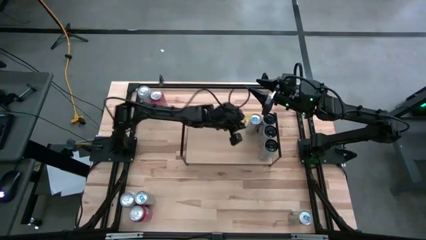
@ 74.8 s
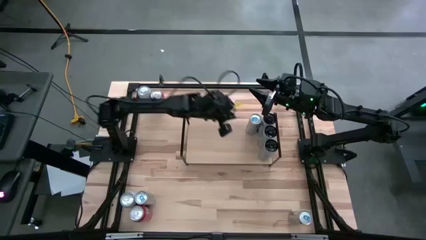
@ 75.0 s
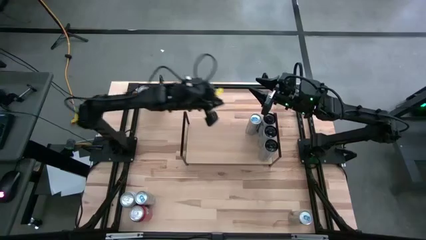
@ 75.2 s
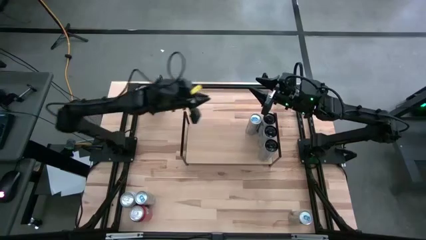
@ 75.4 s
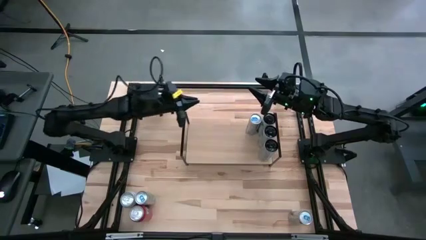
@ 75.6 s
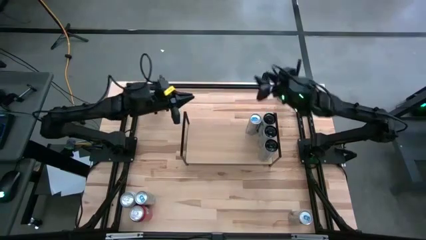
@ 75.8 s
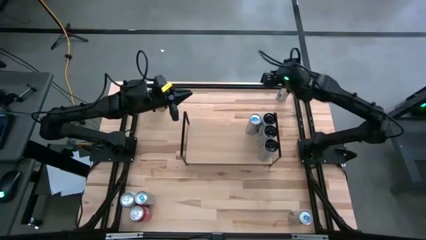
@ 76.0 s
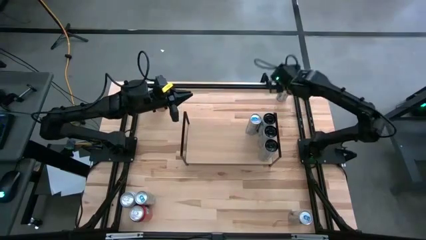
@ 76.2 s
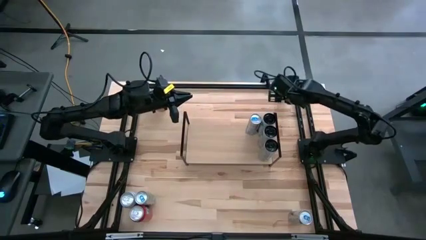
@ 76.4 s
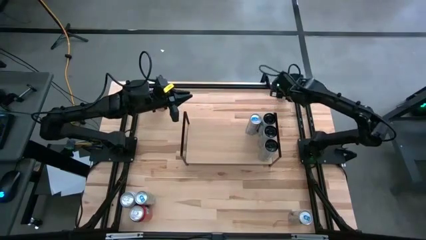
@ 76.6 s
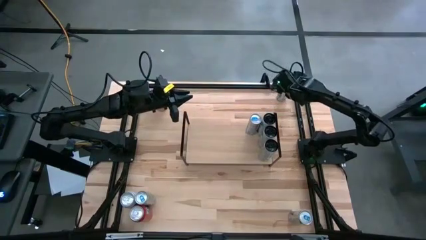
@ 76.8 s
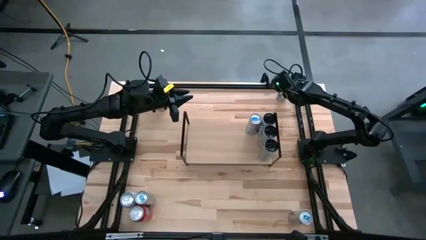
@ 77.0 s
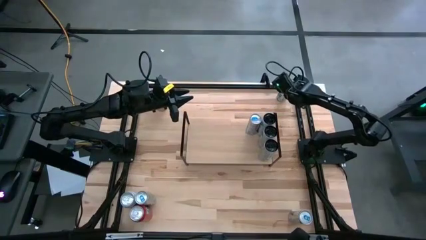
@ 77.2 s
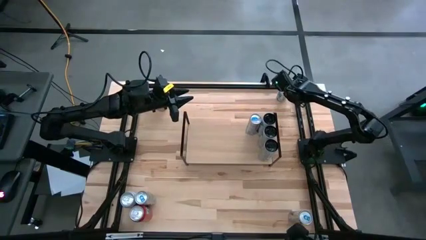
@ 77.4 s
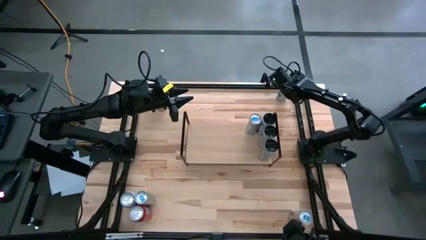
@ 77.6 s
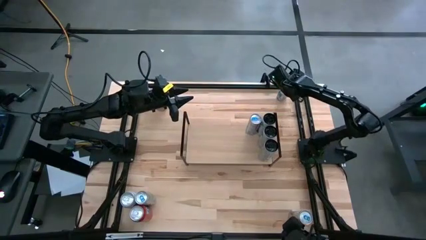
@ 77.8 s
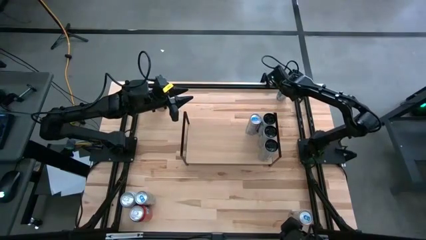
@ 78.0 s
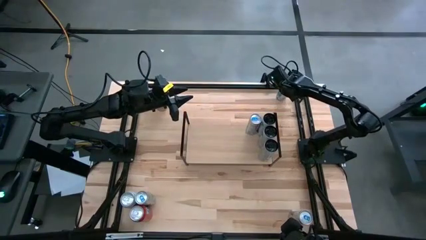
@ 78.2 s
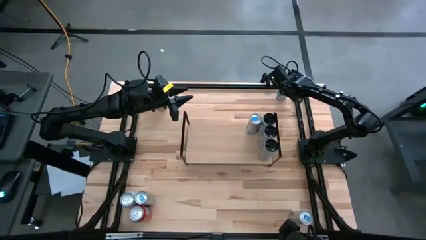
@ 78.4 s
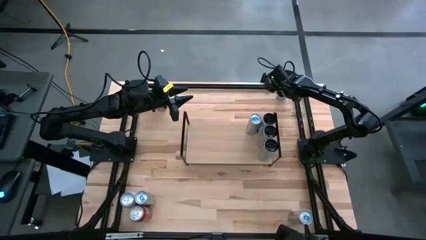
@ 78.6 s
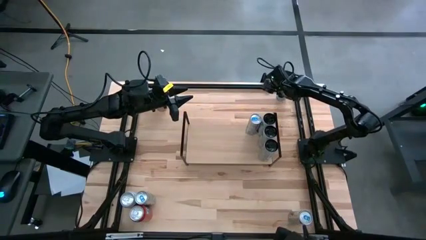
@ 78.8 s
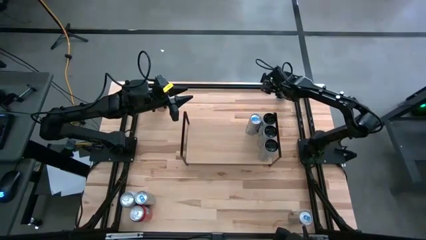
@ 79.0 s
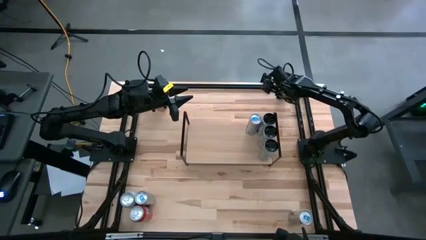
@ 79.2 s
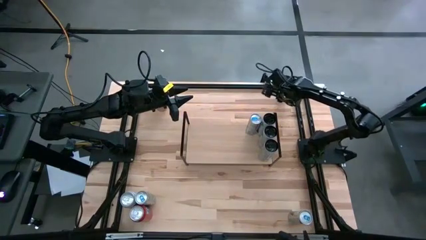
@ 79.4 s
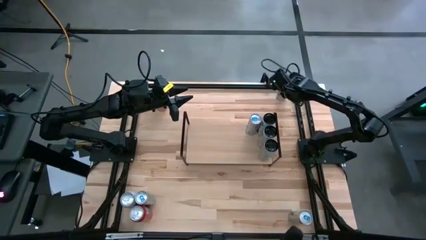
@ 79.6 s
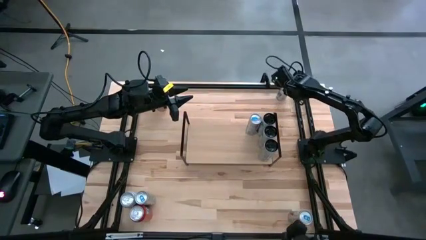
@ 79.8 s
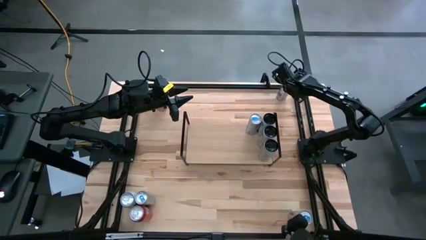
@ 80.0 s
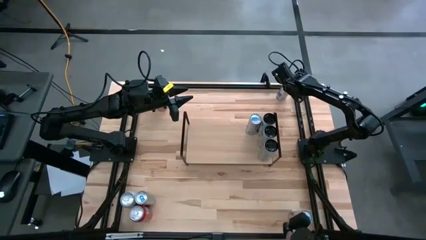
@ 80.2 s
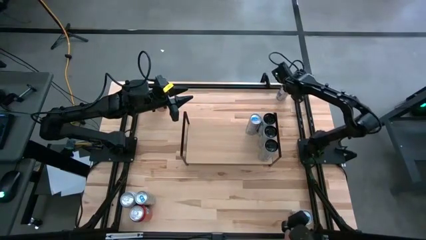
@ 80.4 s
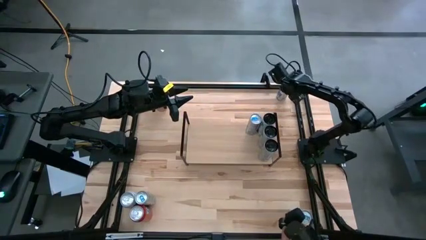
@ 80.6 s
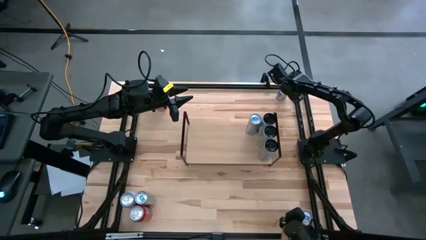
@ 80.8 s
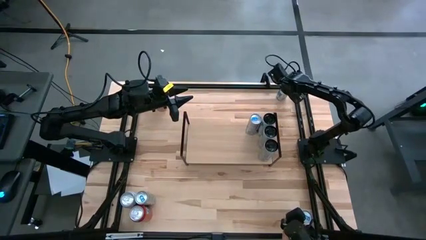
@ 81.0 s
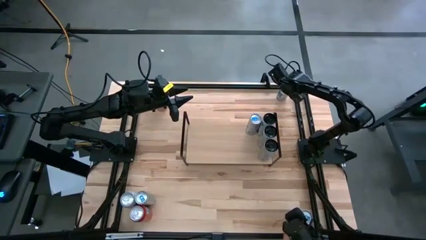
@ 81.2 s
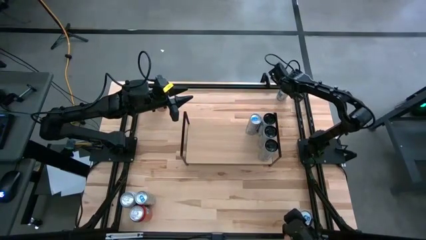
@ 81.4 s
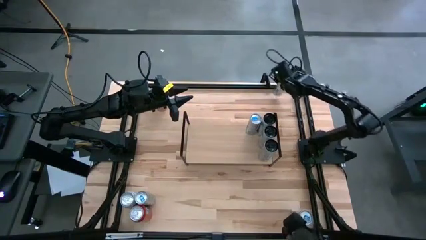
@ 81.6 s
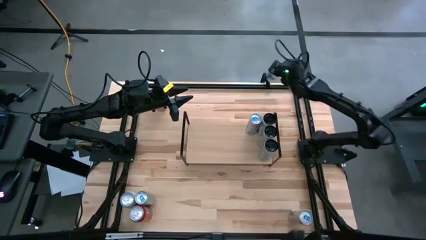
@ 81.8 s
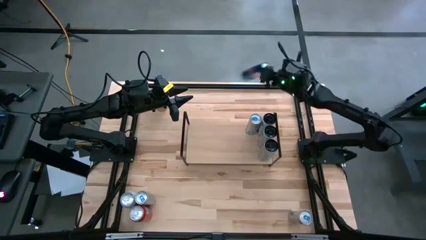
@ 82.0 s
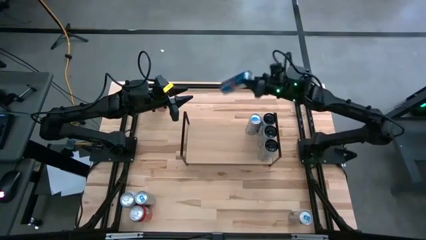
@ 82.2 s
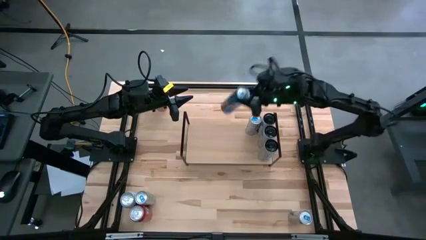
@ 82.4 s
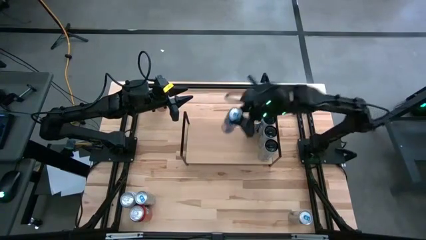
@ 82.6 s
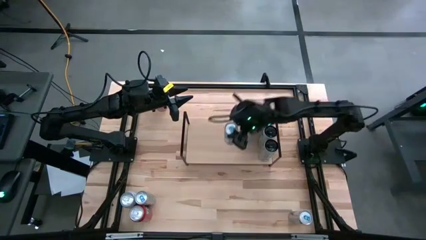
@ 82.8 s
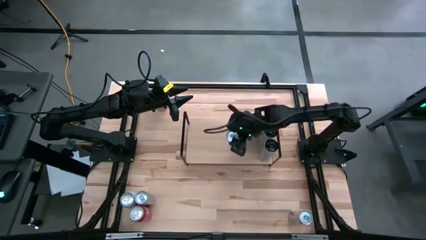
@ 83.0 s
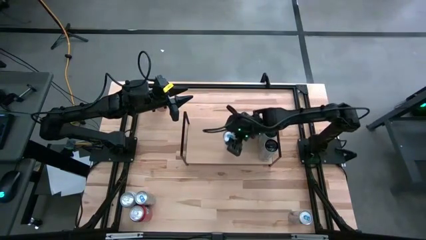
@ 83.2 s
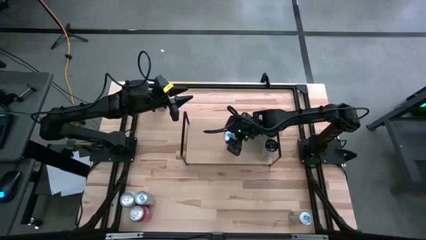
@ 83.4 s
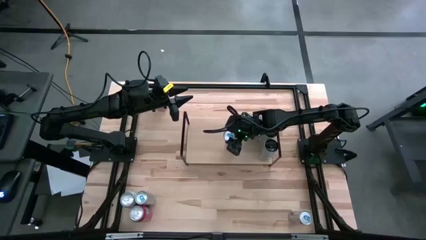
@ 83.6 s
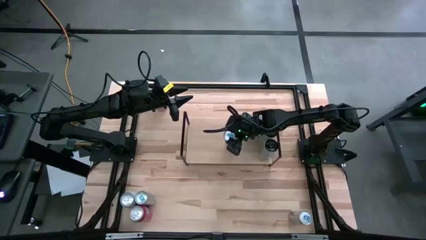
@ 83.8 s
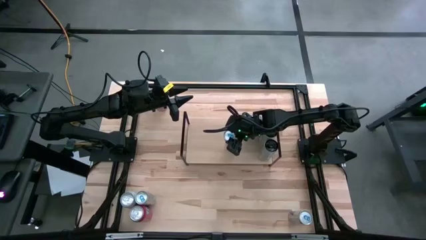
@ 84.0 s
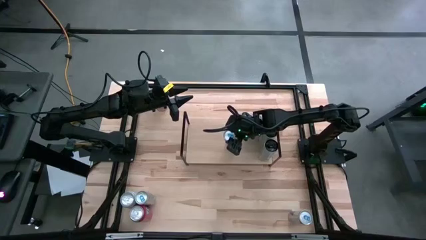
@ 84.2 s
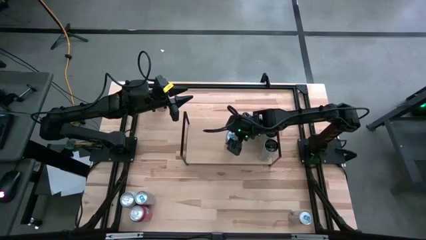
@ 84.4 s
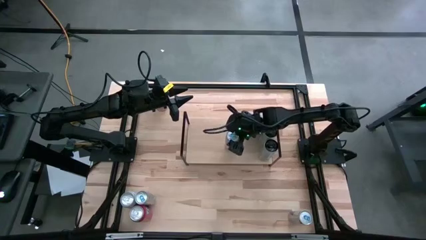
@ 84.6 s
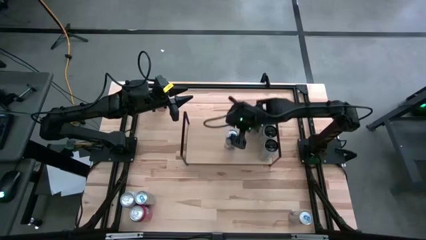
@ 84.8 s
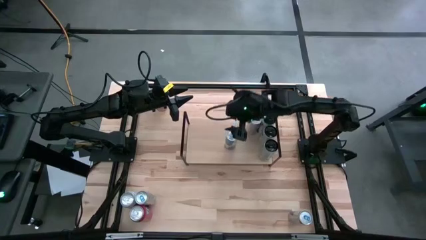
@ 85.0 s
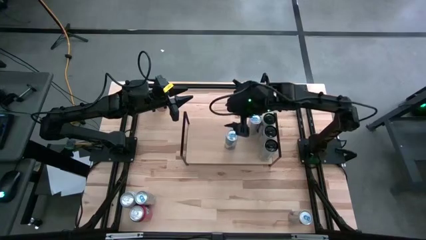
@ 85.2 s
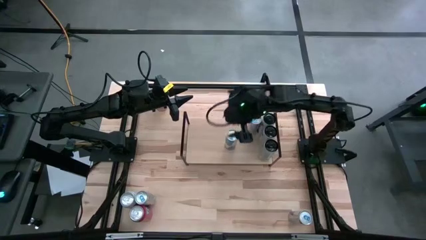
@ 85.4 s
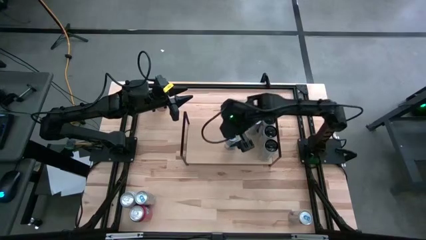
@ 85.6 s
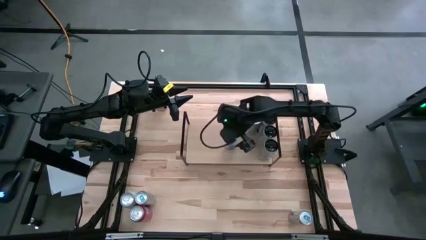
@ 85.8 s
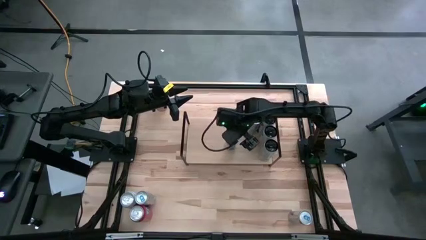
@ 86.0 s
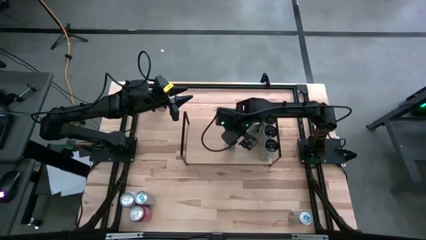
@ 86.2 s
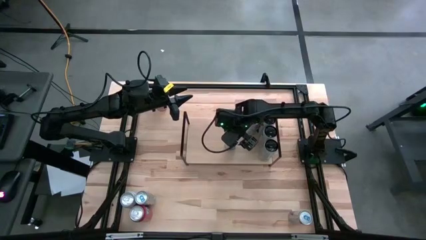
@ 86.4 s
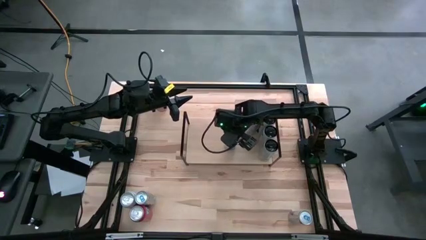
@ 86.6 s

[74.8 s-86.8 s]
Task: Place canned beverage on shelf
Put the blue soda can on the shelf aligned with the other blue soda can

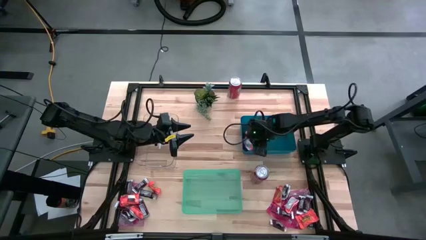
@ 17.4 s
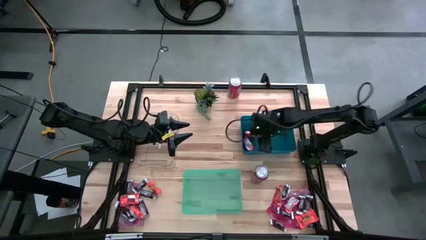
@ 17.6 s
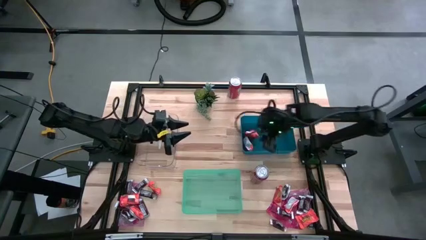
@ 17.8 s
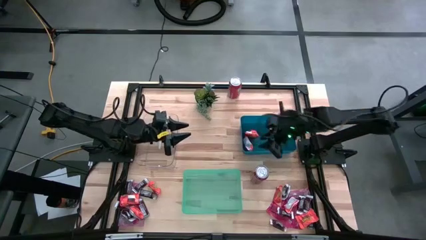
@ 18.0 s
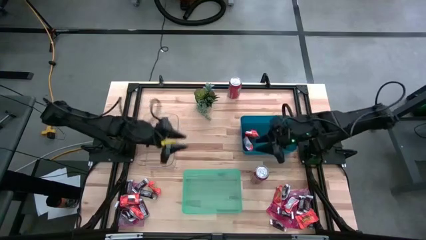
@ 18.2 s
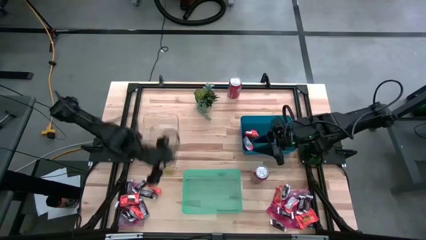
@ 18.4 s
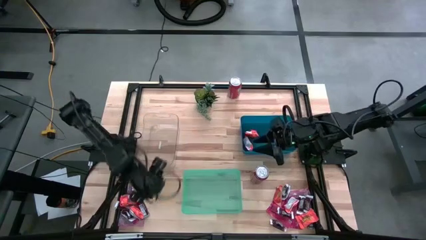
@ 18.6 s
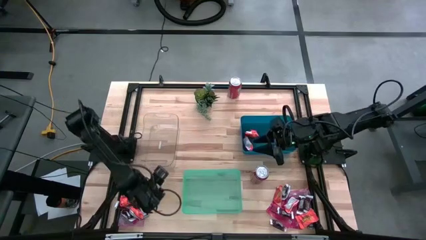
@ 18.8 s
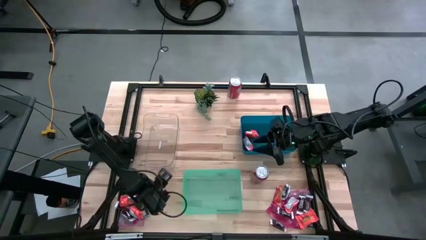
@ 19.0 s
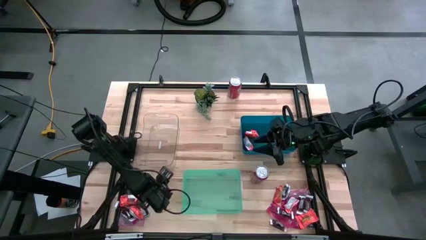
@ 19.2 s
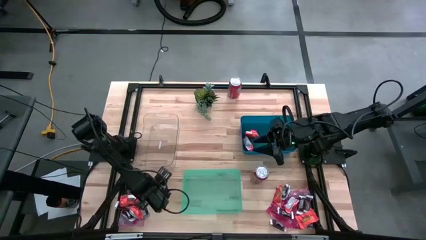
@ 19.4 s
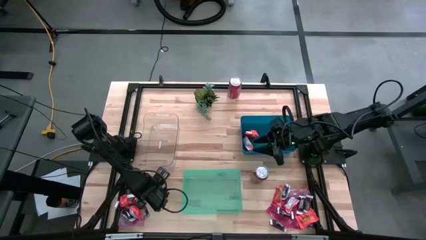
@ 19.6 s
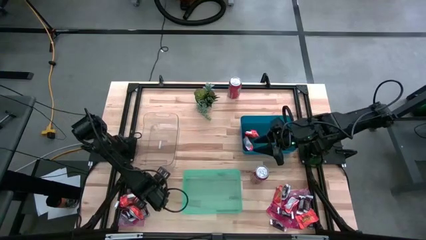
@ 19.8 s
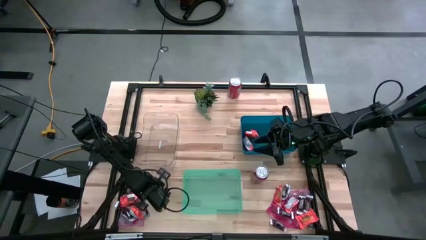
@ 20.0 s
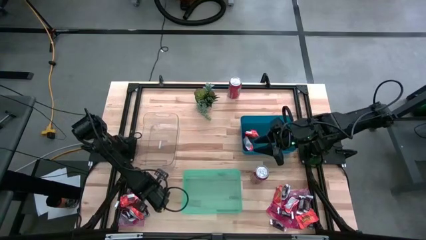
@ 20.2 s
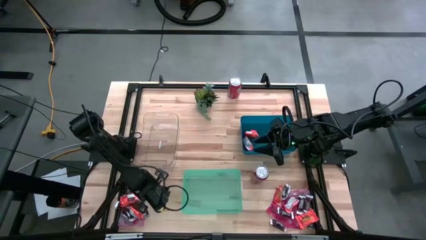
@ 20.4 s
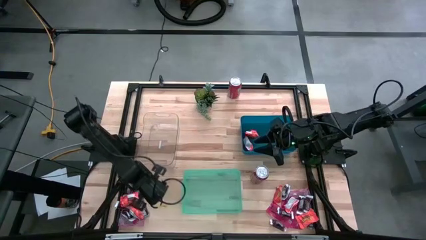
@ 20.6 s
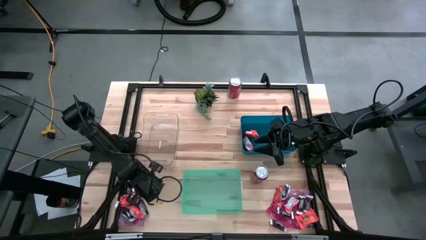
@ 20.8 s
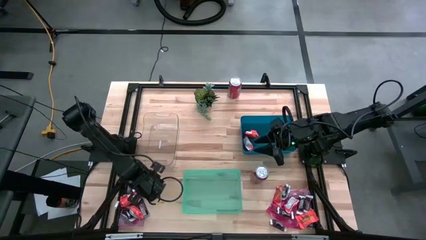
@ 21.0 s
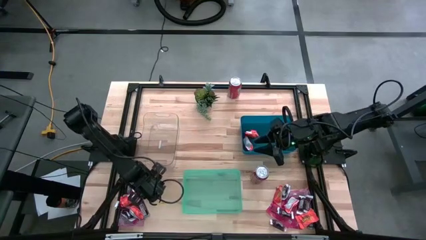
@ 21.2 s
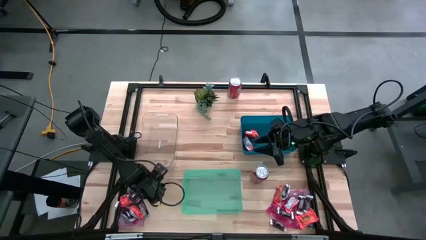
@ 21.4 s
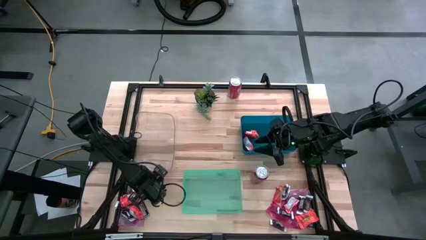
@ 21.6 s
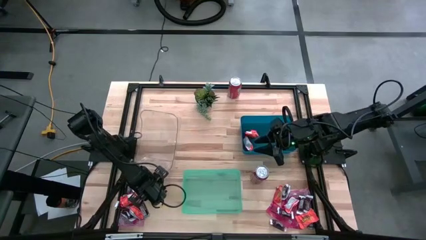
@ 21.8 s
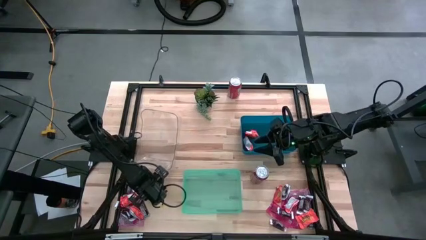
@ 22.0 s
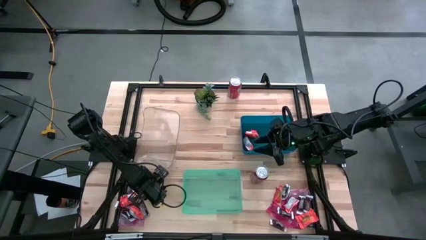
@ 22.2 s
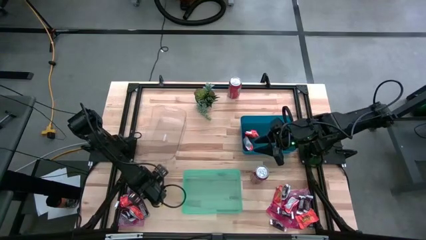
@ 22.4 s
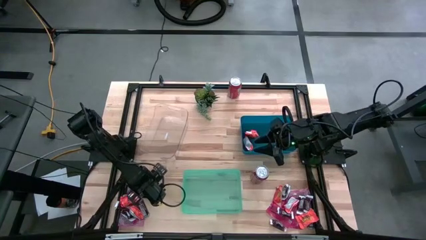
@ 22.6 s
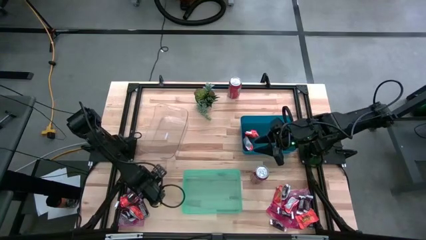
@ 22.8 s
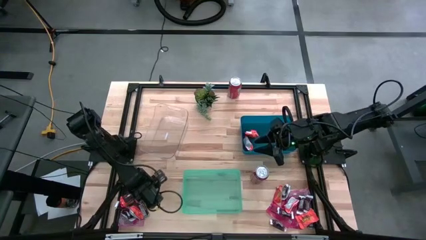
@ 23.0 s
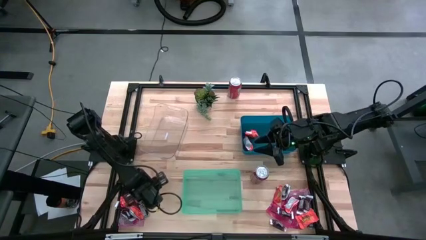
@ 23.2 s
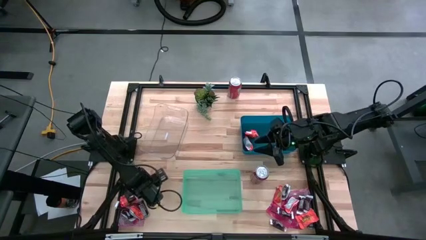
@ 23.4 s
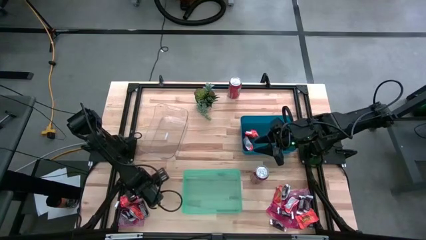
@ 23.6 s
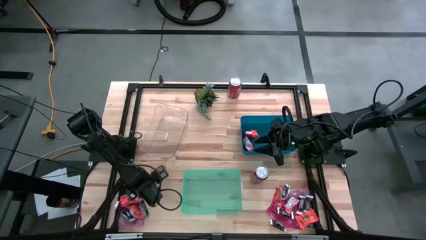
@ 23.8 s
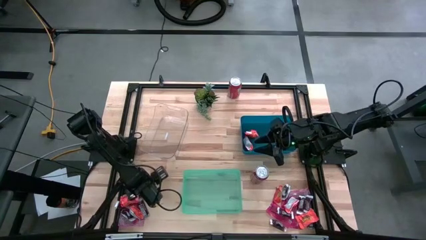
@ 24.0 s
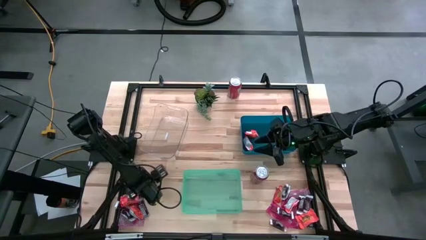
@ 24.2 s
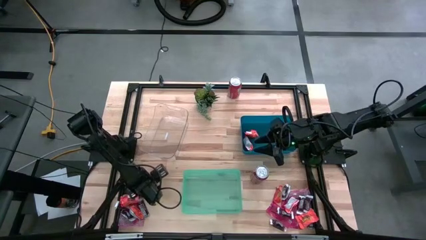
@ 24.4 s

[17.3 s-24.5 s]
Task: Sort candy
Put the orange chocolate into the blue bin
